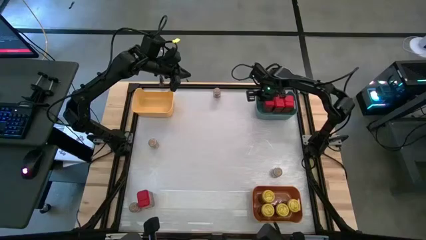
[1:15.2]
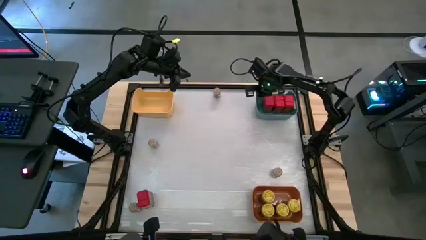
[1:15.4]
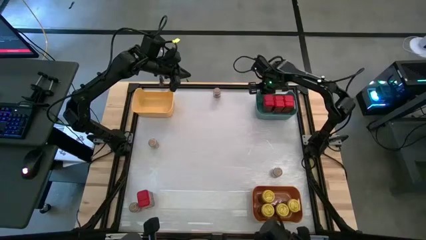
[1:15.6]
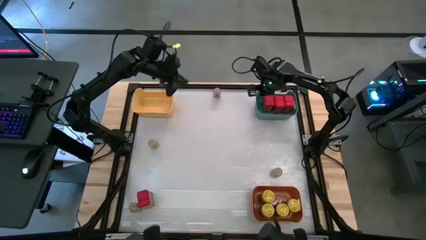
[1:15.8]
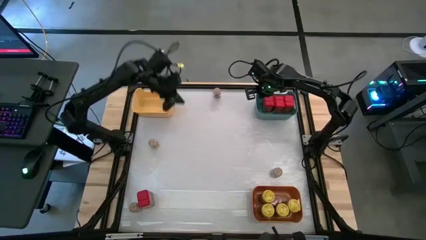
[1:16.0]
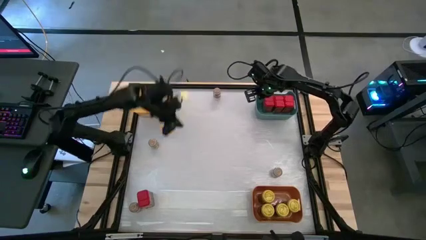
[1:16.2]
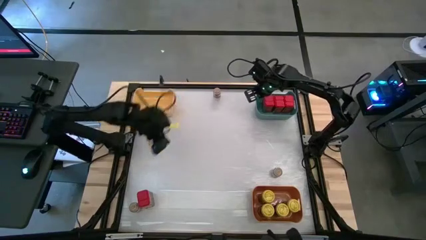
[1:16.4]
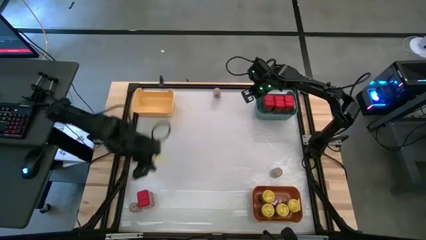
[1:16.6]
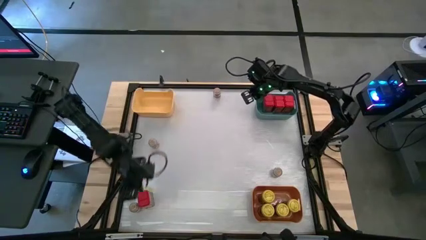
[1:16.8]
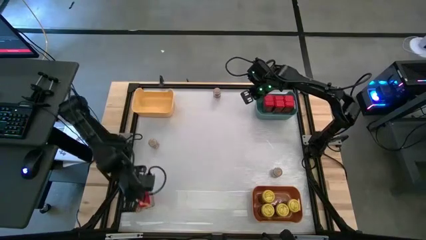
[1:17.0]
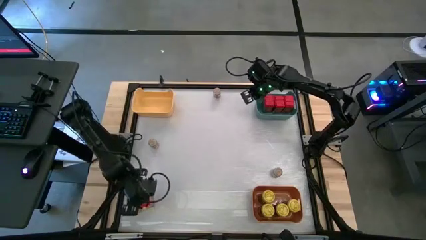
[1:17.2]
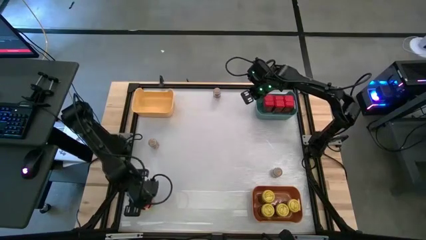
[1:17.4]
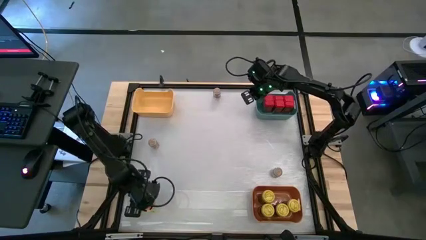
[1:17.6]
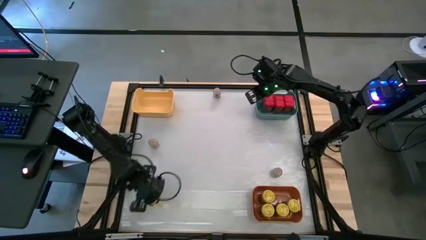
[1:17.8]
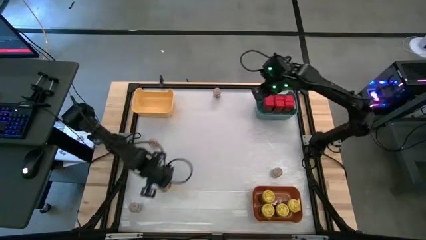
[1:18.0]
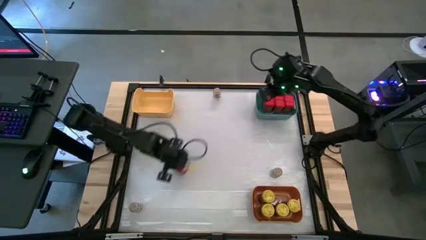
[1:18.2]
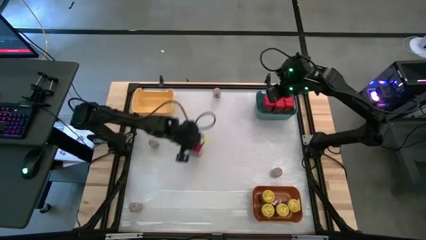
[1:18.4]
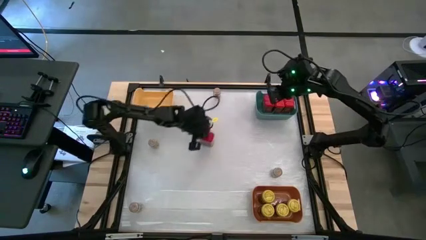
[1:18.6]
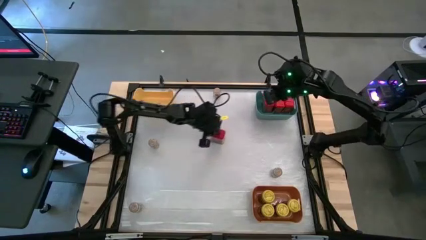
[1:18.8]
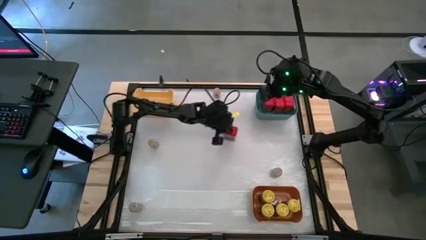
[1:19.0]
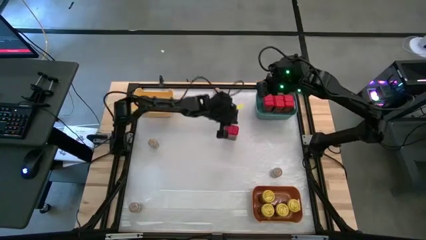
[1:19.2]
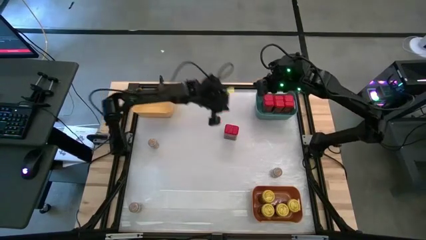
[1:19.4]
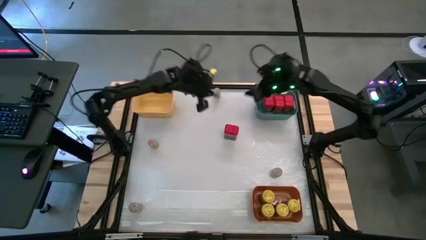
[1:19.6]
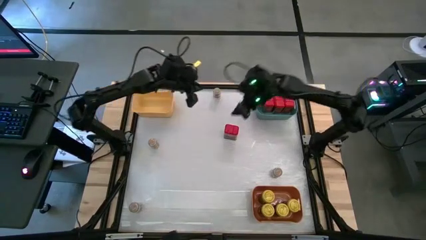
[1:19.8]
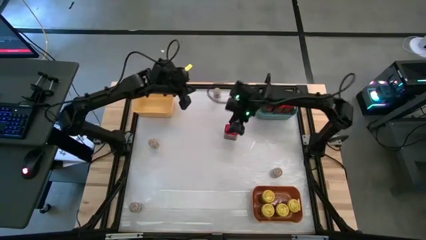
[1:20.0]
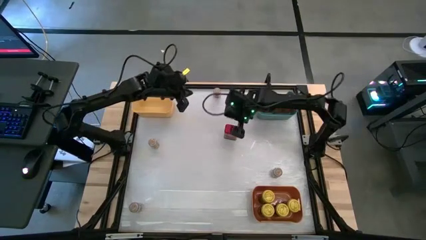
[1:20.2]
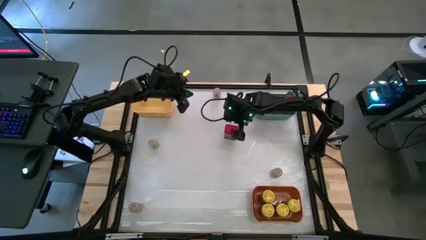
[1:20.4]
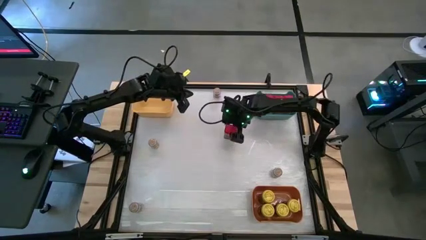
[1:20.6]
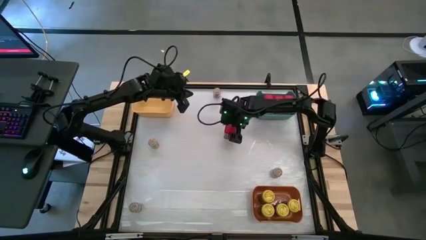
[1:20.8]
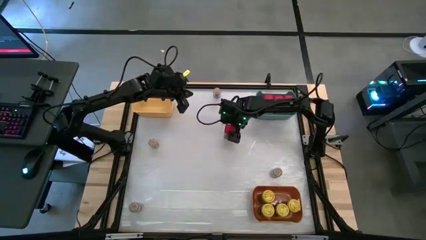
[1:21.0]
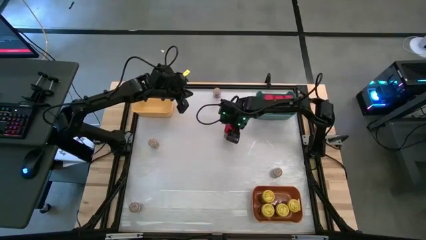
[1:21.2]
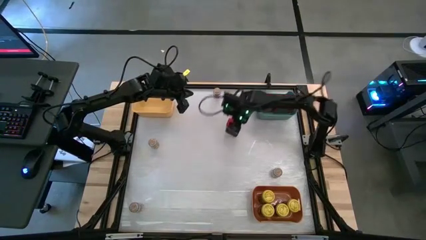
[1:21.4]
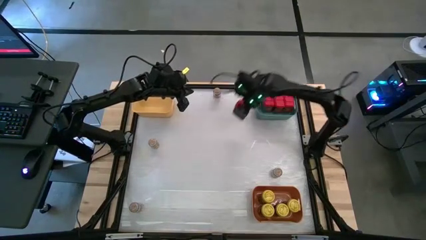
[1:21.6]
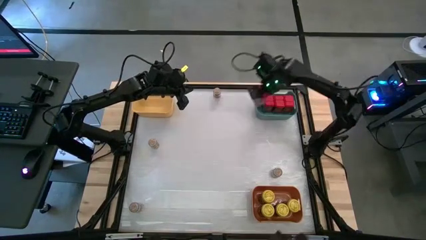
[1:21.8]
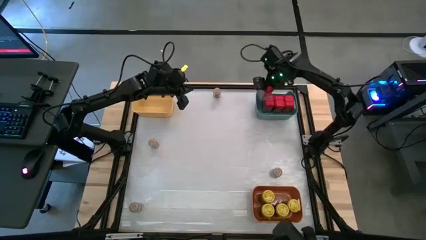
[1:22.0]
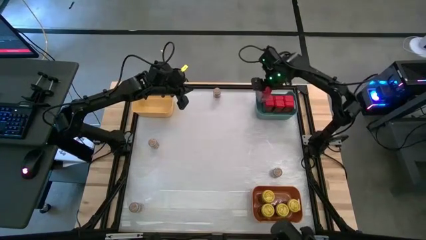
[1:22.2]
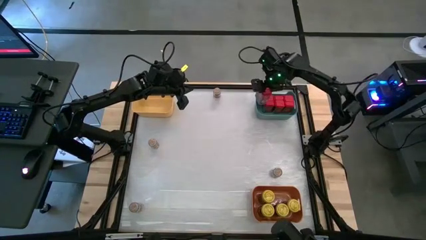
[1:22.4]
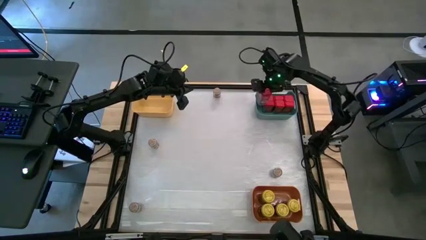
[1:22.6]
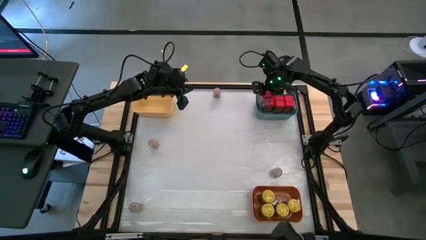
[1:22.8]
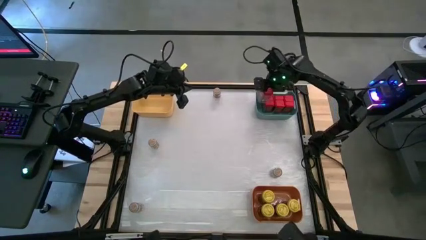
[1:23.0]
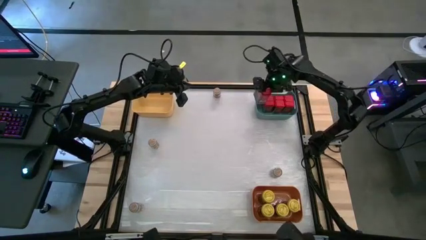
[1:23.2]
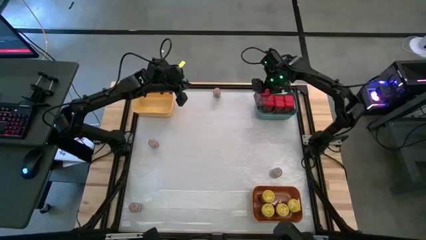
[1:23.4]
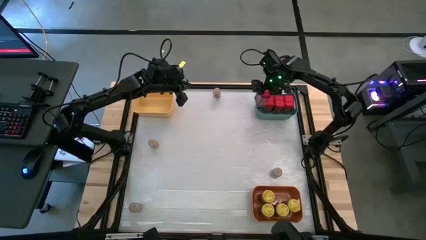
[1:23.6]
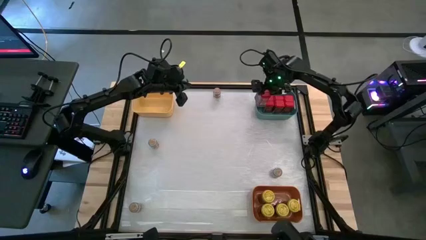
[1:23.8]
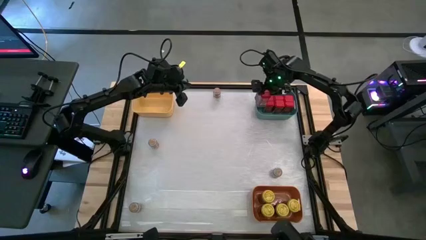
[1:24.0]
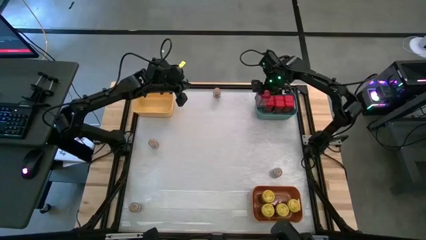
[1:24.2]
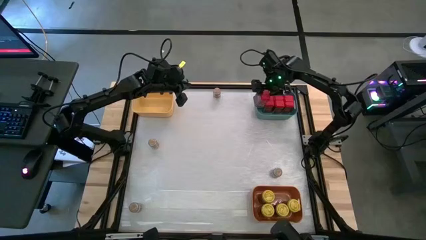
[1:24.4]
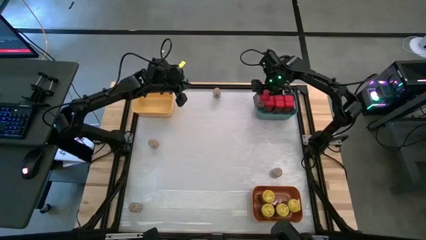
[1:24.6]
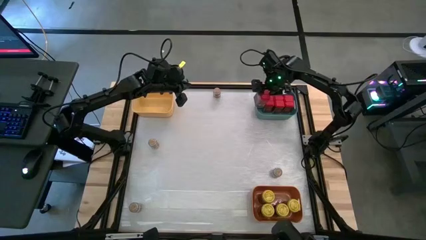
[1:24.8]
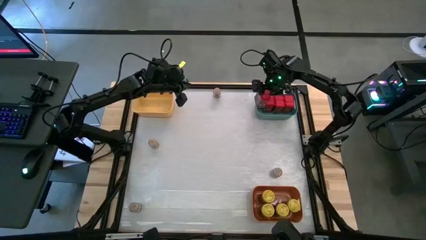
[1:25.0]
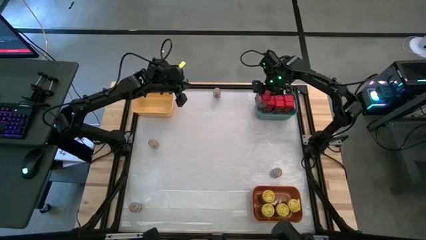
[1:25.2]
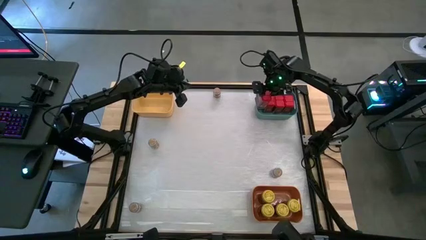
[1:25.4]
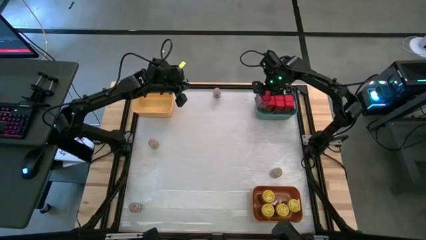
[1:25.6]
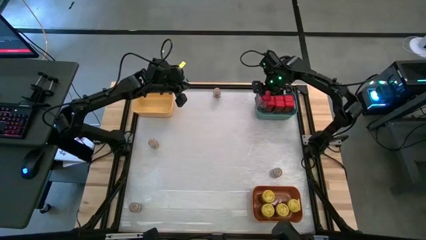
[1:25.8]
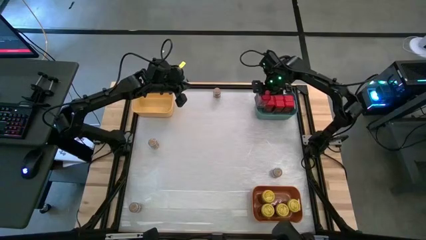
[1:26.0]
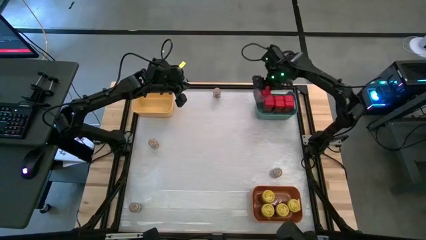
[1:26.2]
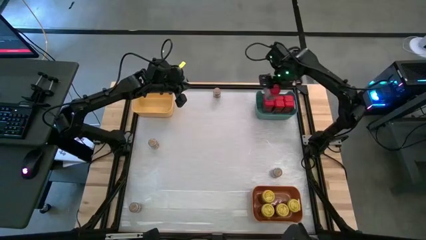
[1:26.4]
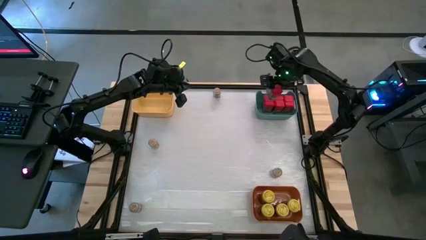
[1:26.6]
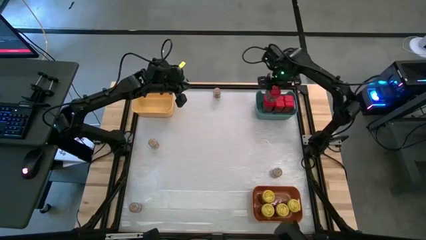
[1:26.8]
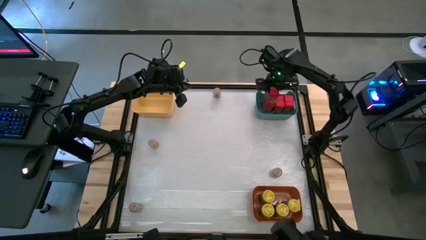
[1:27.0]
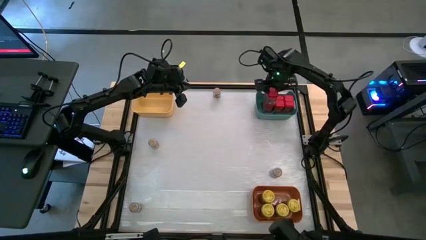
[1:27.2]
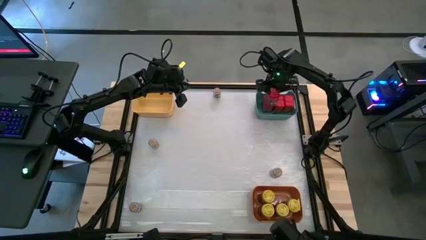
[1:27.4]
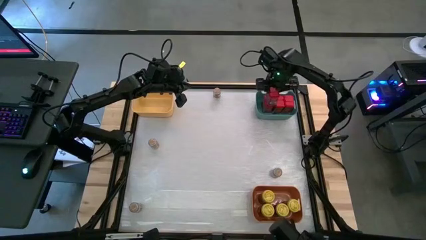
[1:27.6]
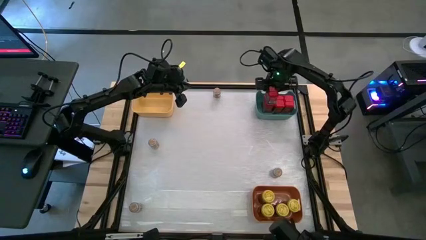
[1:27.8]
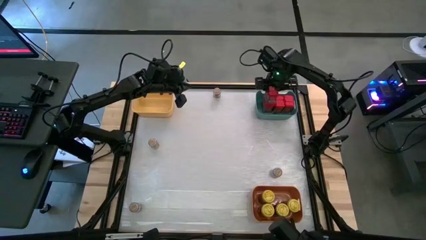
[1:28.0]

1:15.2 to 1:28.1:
Task: Sort spices by type
Stack the red seasoning can on top of the other red seasoning can on the green bin

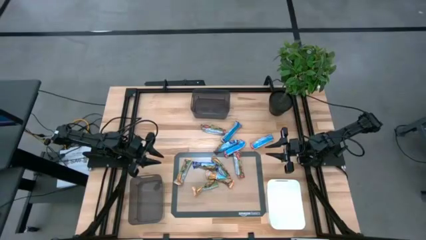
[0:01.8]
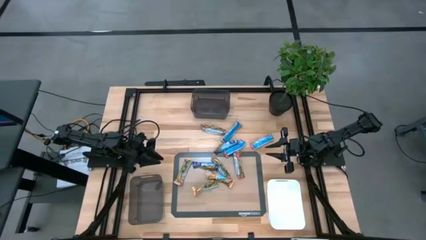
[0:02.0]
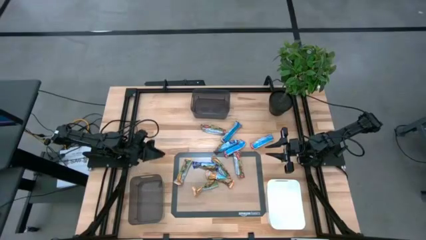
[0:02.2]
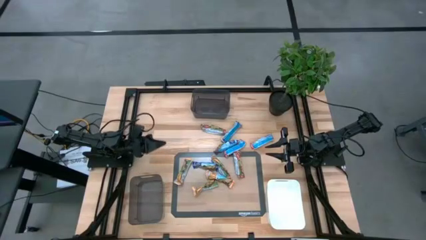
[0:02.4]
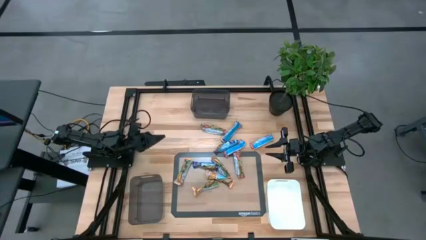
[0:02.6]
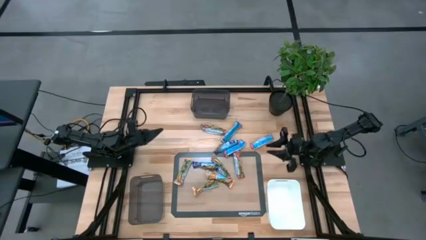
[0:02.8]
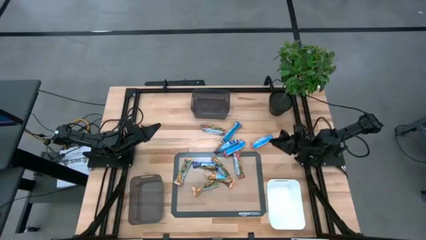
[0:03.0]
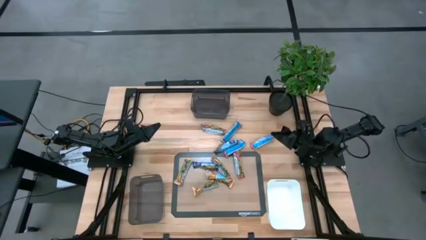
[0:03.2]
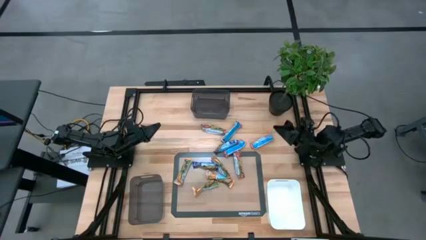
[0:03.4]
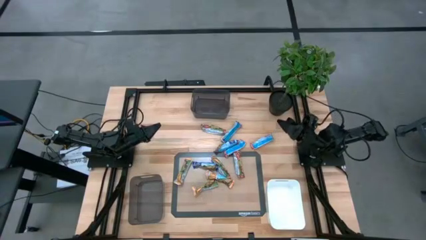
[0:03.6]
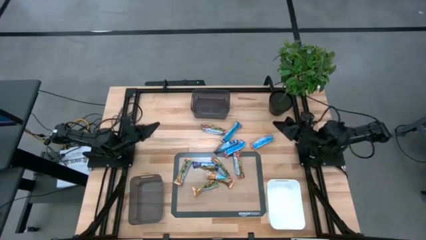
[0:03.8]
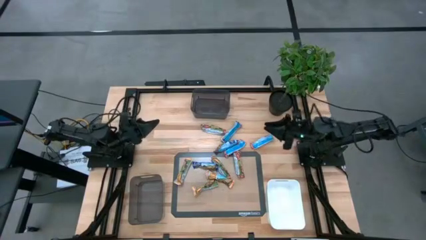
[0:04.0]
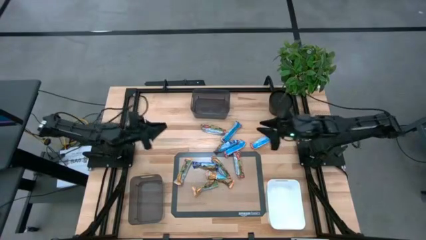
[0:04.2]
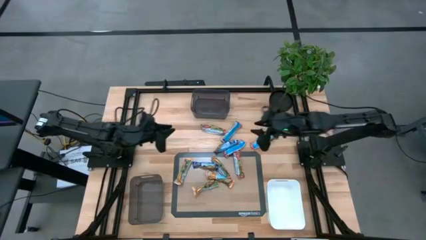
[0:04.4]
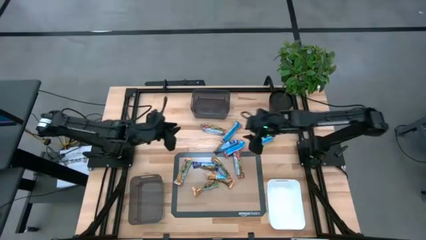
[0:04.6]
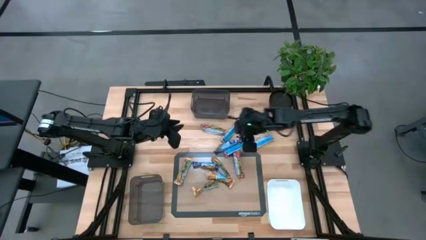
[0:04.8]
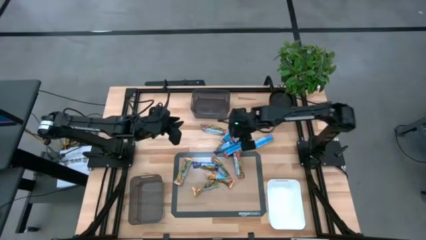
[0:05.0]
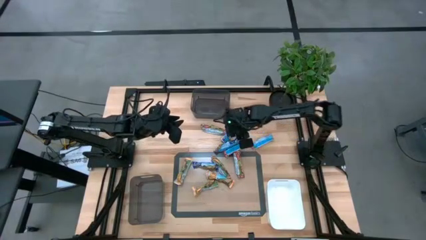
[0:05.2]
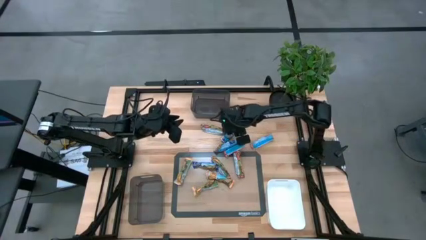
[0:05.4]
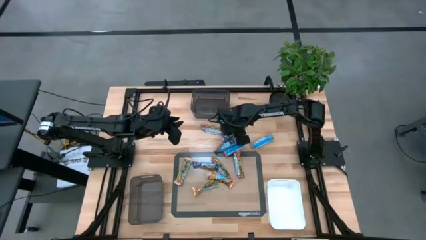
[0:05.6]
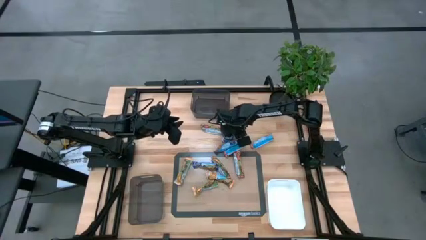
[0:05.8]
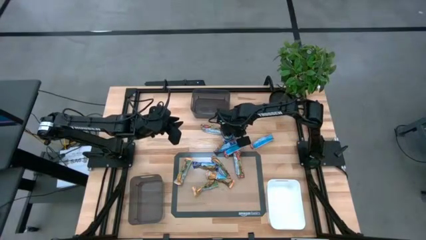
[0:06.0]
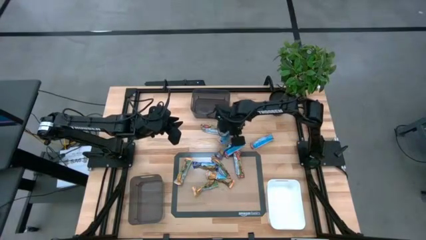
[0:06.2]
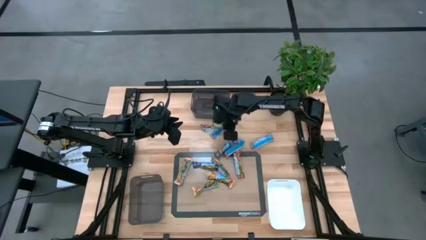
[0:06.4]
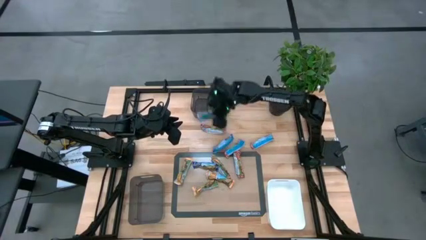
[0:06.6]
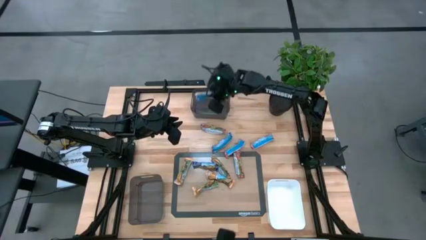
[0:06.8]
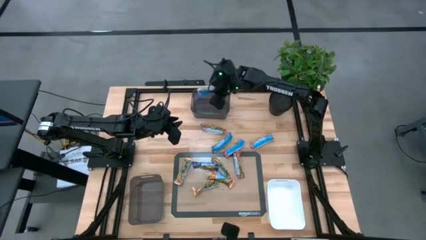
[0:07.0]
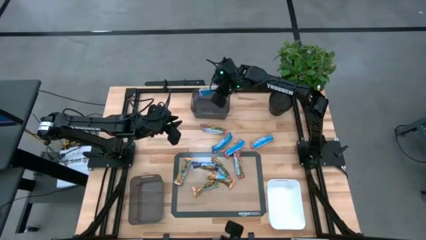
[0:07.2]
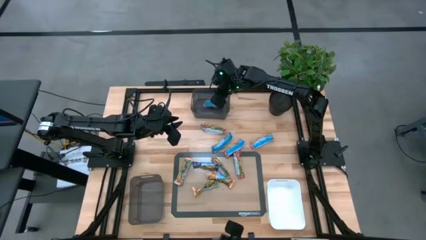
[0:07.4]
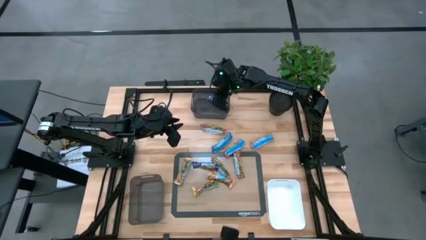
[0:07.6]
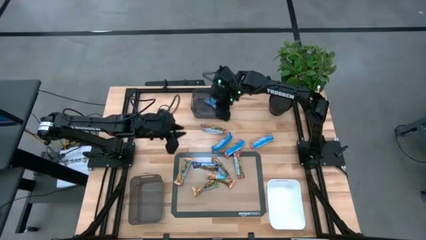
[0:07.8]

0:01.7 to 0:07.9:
Task: Pick and place Granola Bars by type
Put the top blue snack bar into the top black transparent bin
